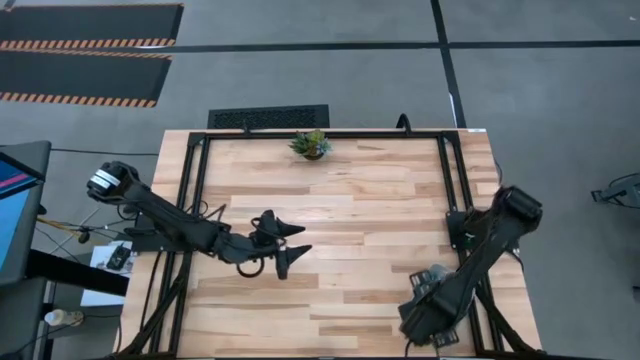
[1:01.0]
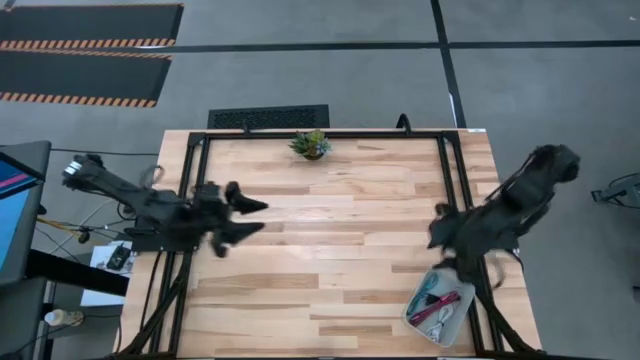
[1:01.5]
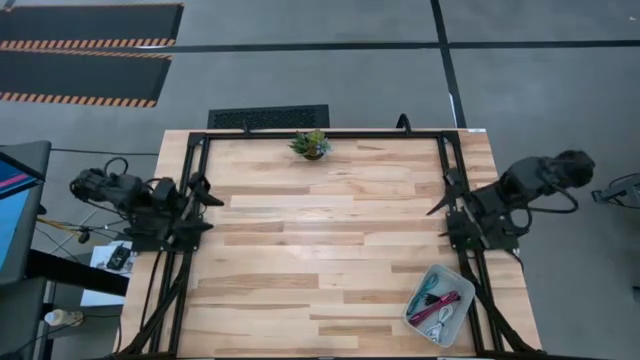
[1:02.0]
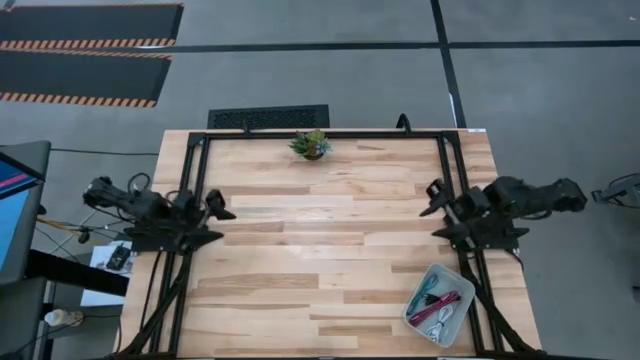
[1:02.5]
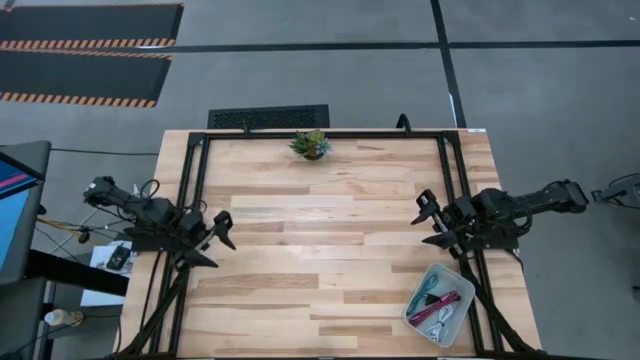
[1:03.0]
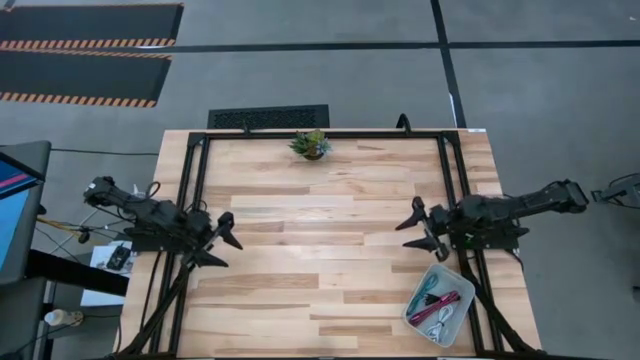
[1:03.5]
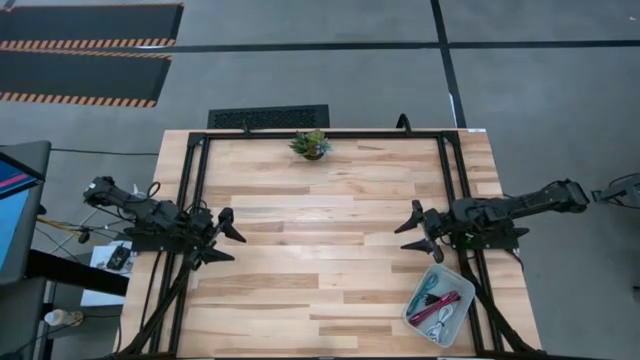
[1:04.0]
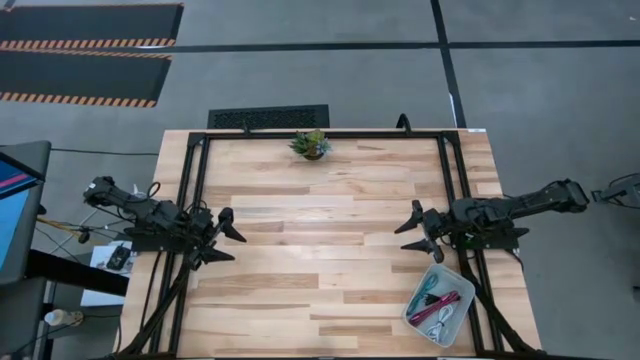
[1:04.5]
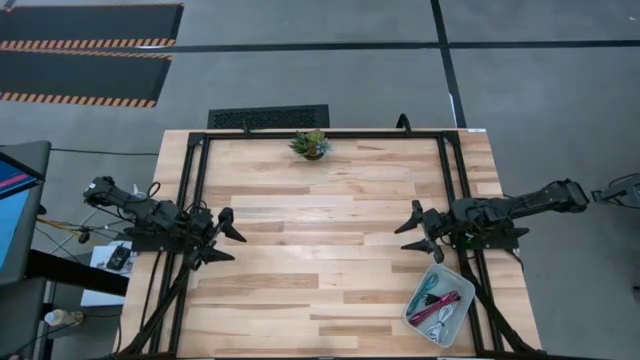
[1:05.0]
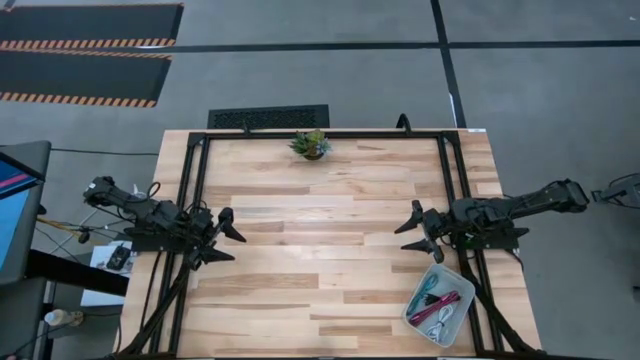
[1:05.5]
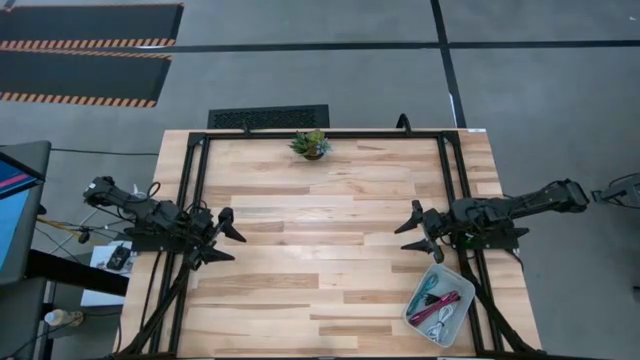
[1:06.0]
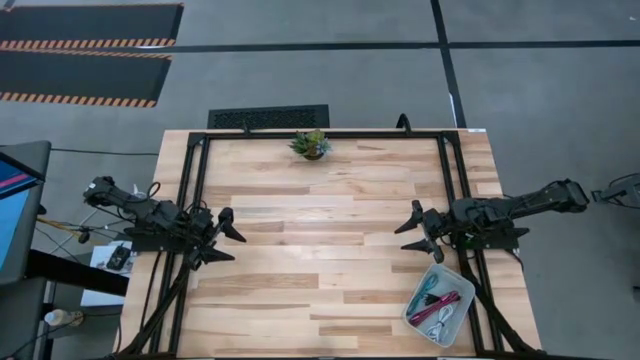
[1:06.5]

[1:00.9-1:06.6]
Task: Pick and place USB-C Cables
Return to Home Position

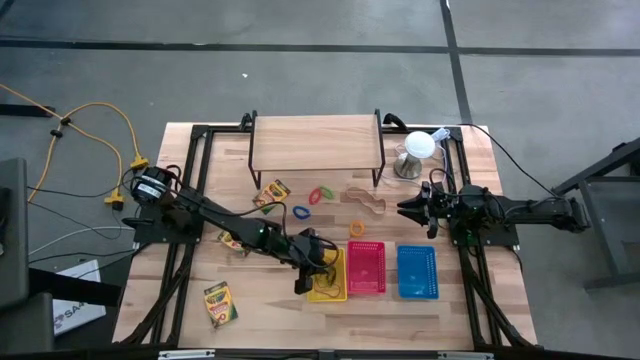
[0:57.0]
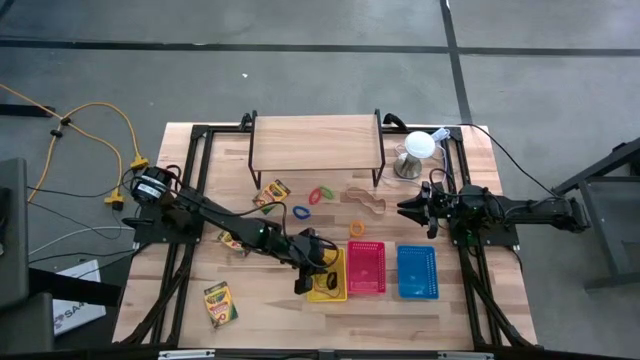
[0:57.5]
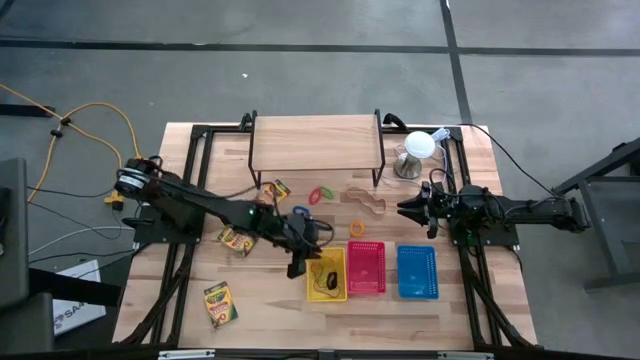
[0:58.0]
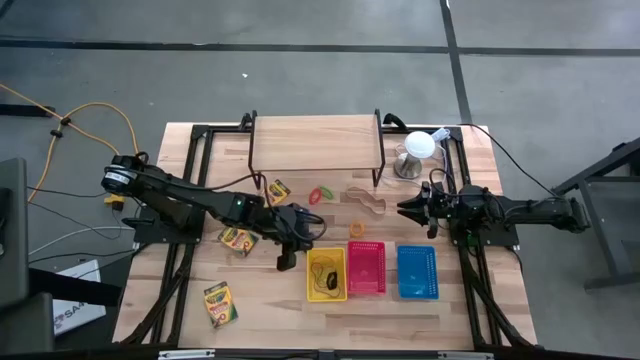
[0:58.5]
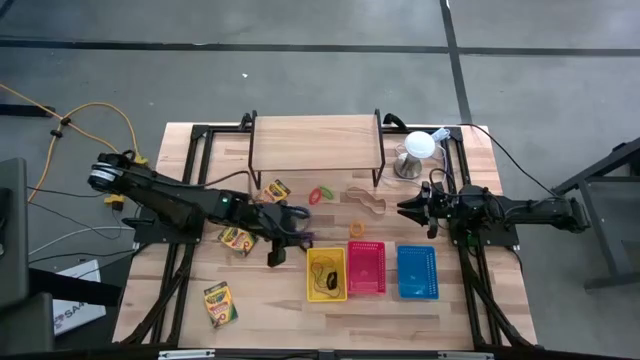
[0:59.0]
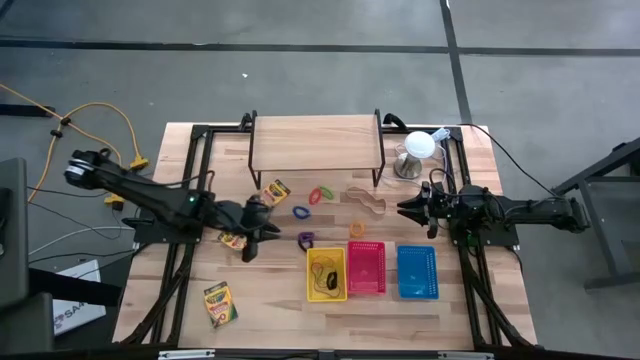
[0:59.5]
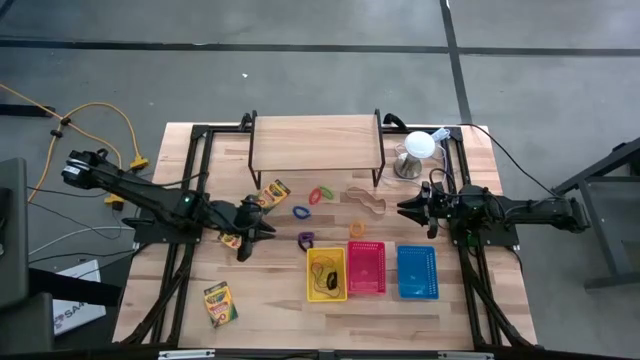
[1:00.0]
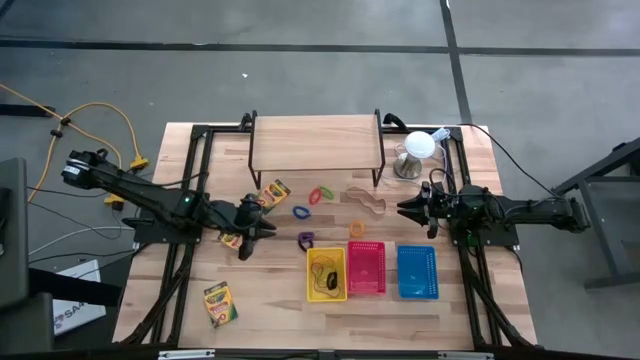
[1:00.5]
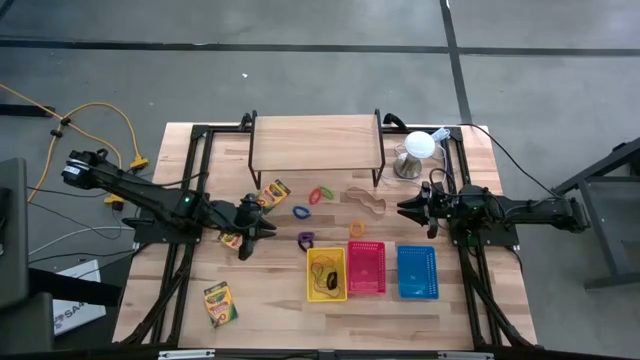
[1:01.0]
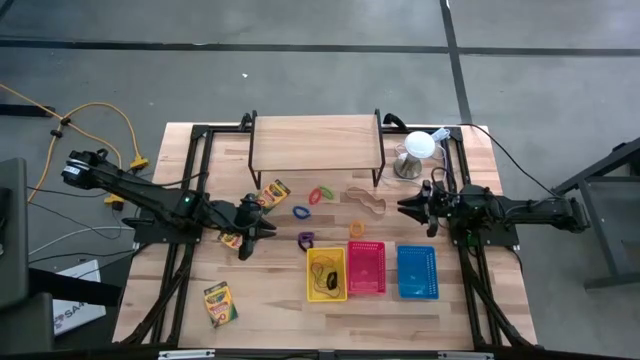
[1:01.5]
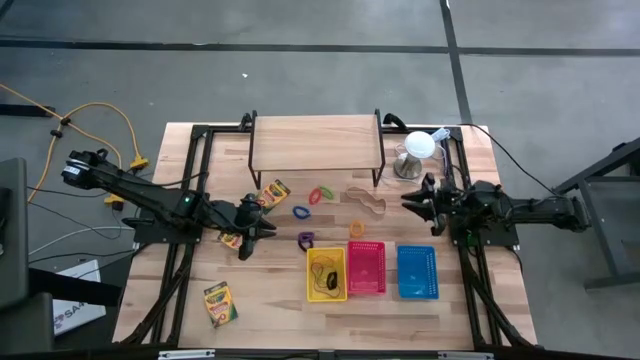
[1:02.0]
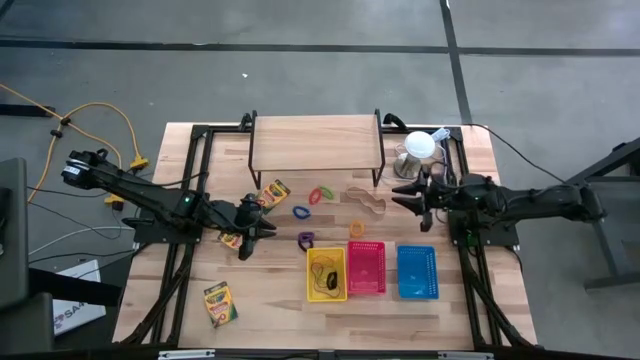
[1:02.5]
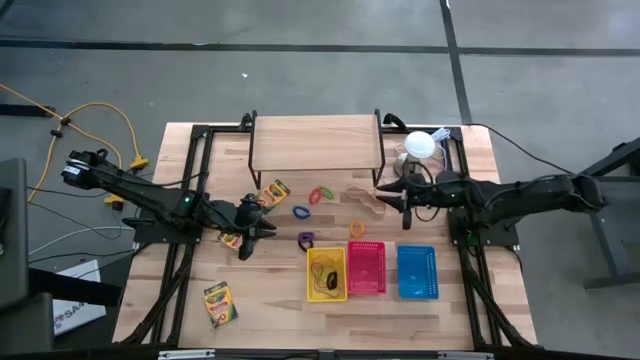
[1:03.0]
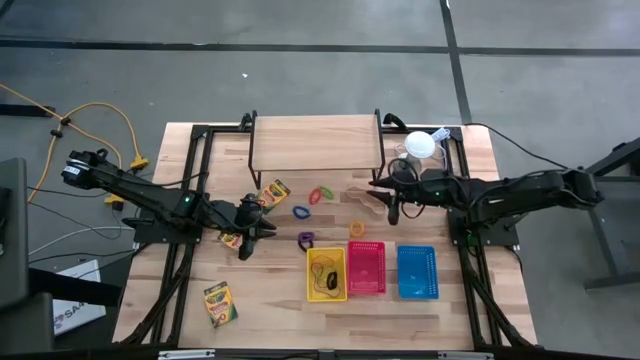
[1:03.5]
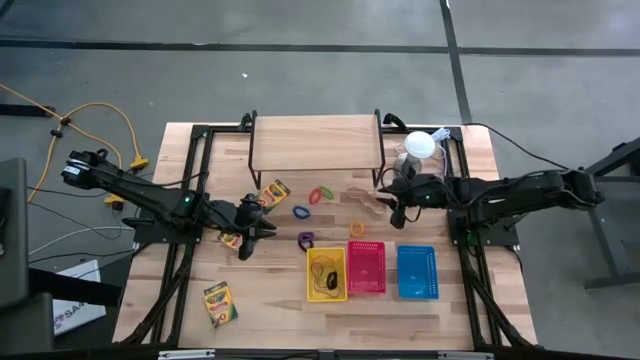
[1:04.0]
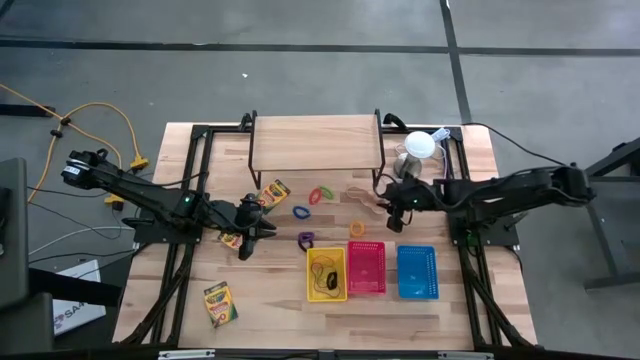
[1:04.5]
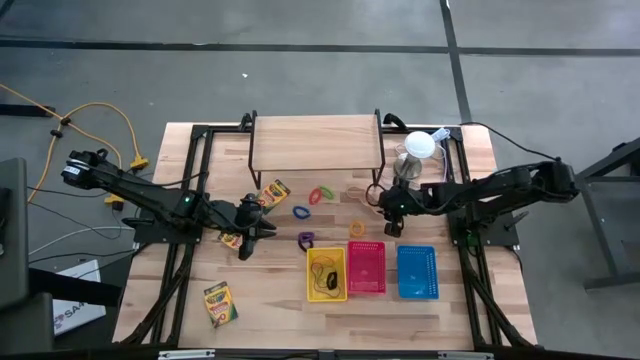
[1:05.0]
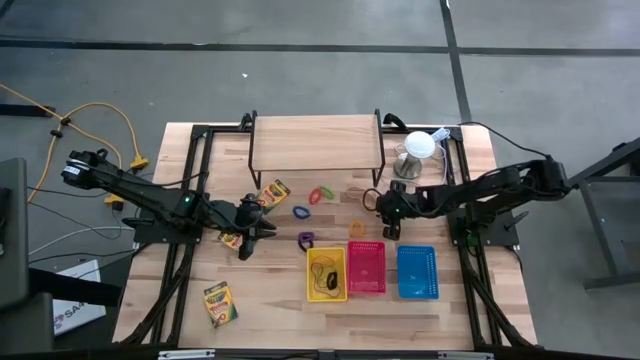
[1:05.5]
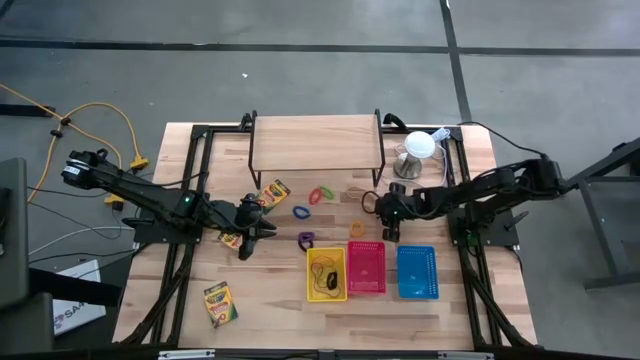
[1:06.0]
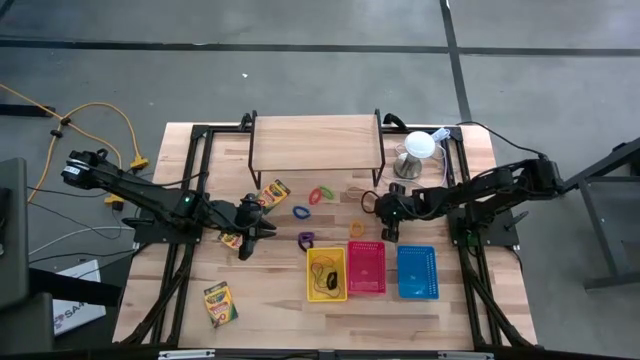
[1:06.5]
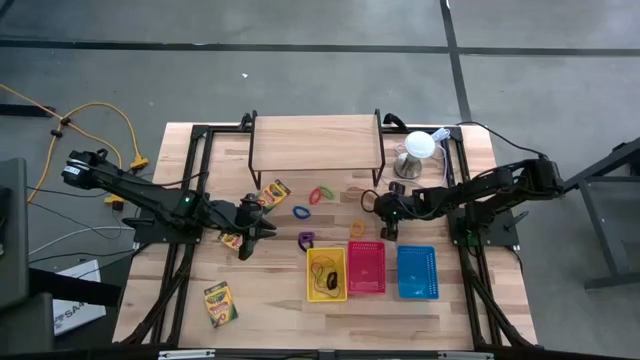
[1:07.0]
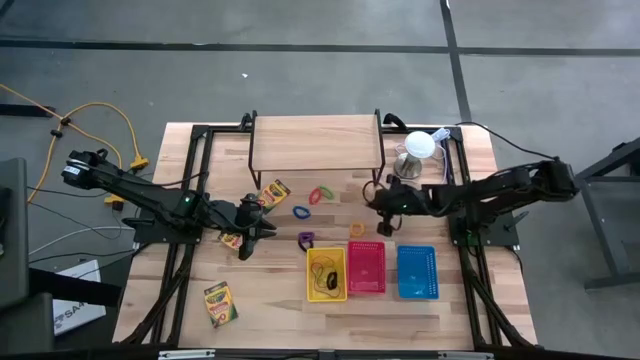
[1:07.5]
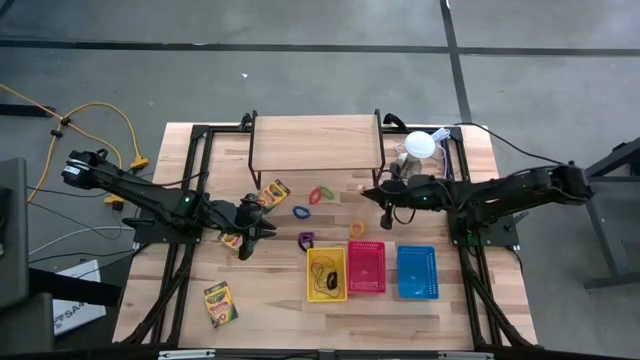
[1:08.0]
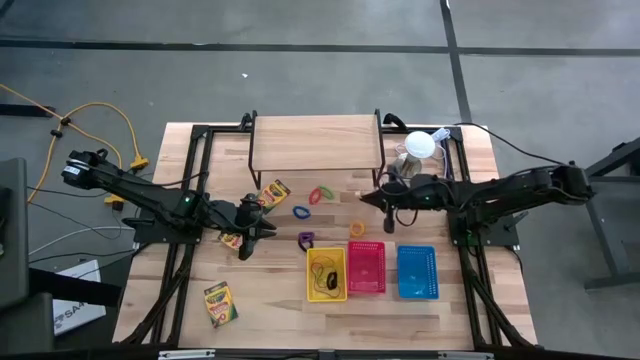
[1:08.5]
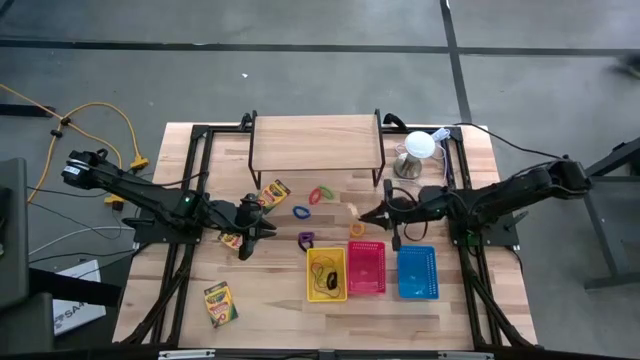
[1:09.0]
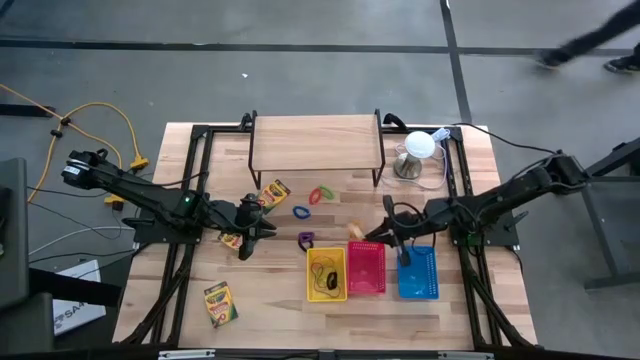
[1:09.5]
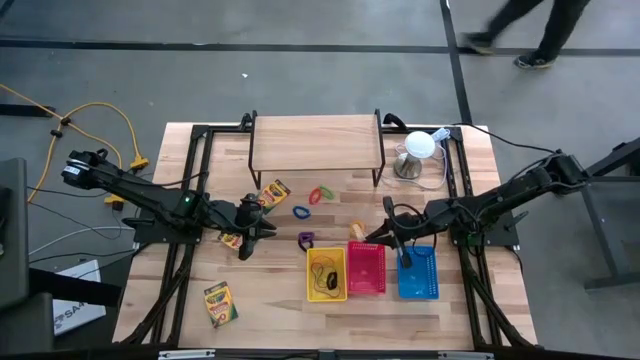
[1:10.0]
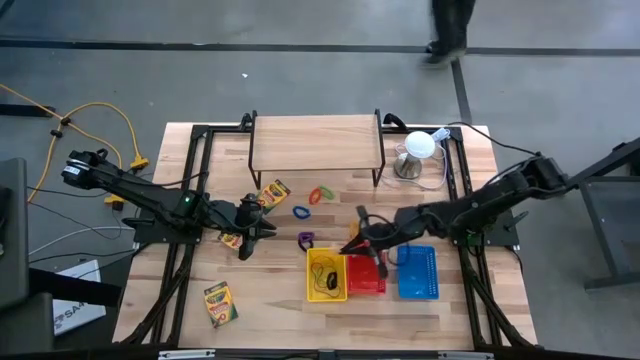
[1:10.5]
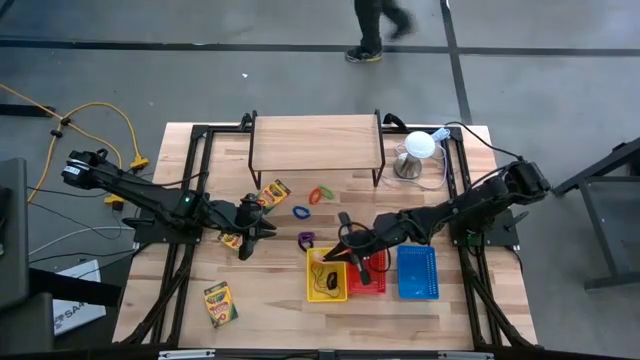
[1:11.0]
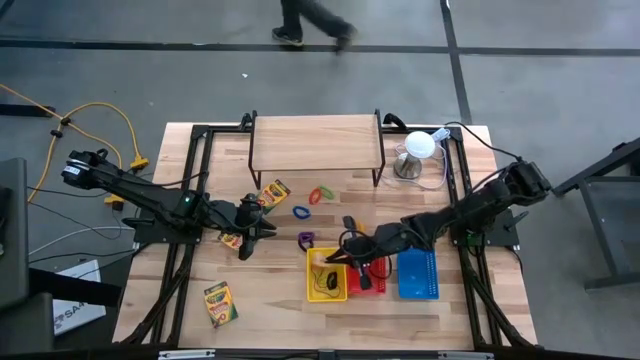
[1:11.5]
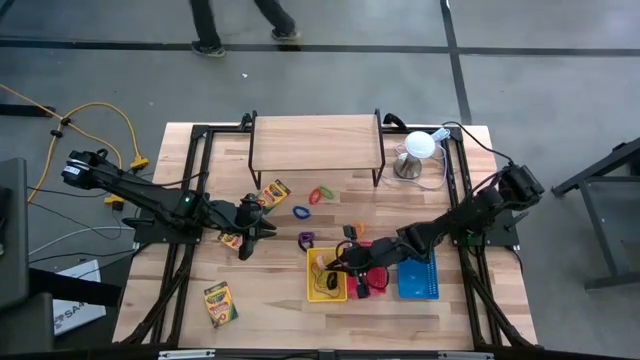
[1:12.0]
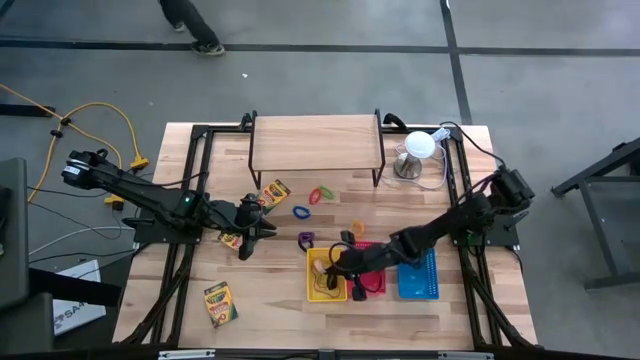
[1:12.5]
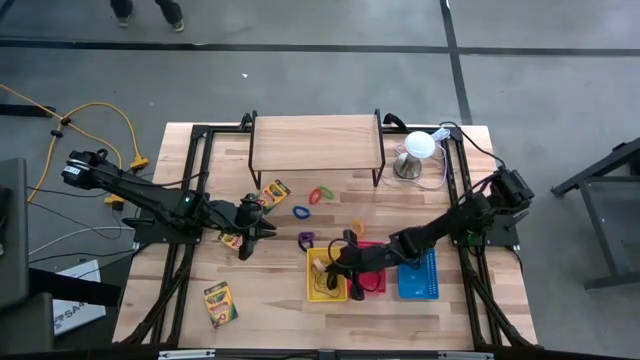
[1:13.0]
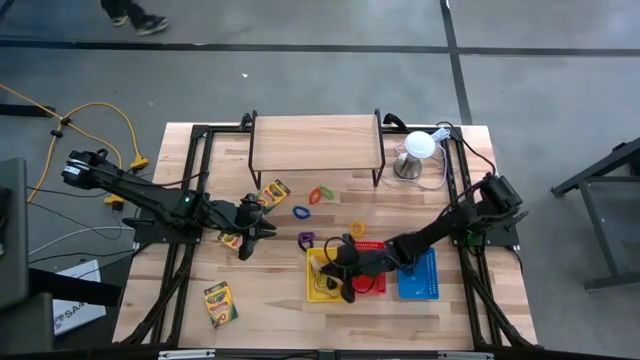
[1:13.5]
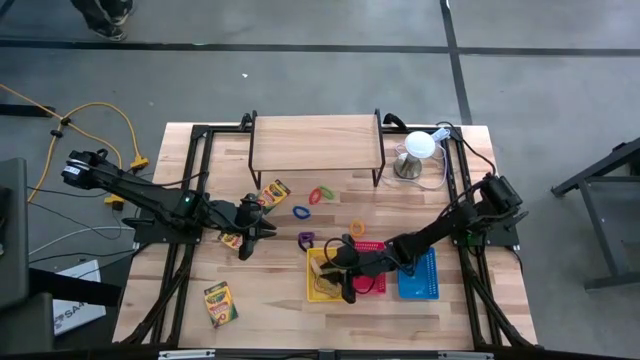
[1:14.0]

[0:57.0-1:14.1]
Task: Pick & Place Office Desk Supplies
Put the white rubber band into the yellow bin
